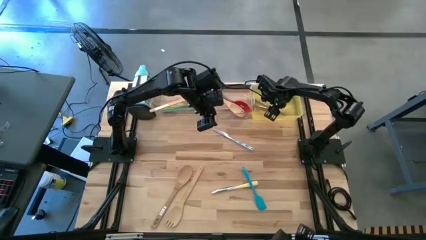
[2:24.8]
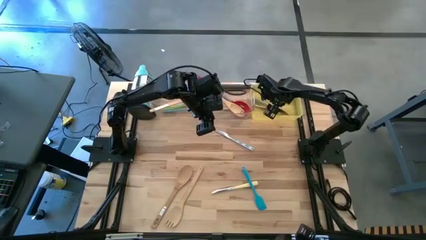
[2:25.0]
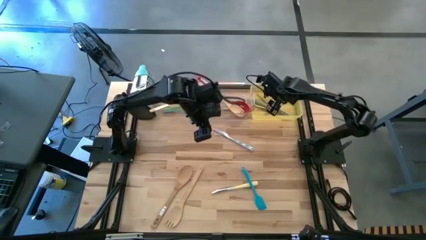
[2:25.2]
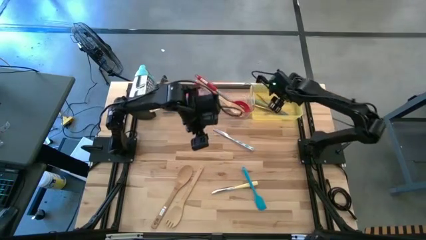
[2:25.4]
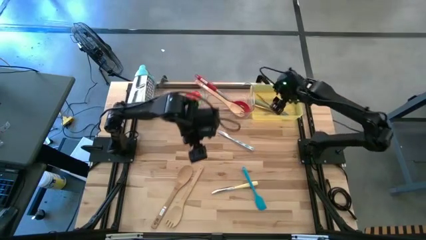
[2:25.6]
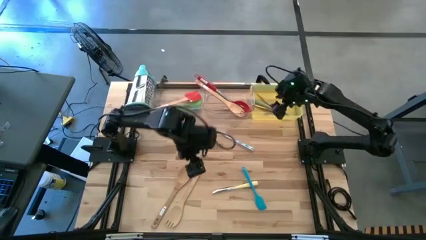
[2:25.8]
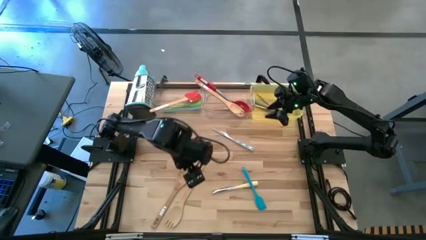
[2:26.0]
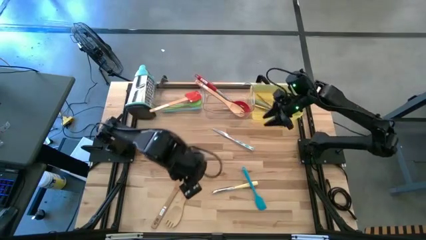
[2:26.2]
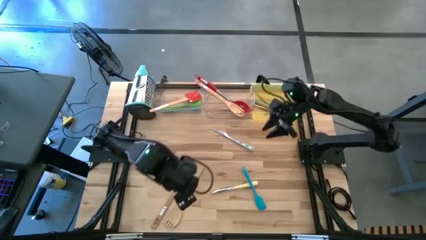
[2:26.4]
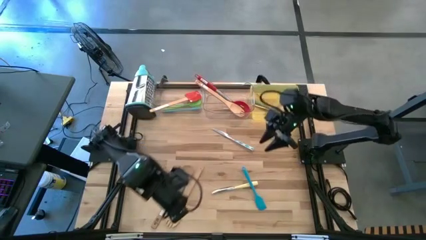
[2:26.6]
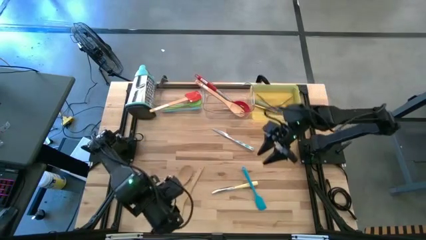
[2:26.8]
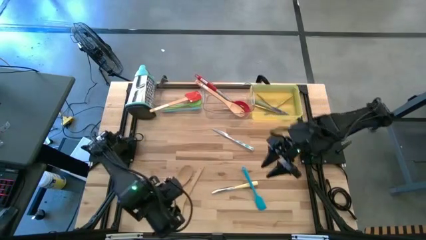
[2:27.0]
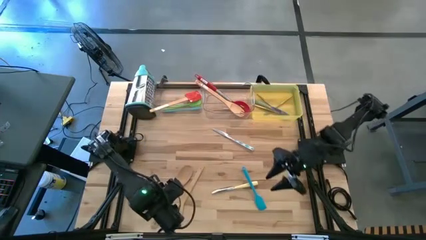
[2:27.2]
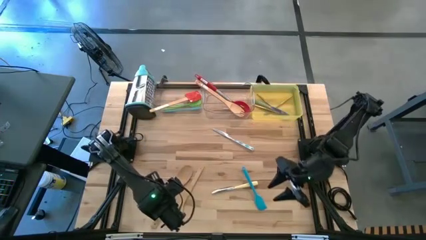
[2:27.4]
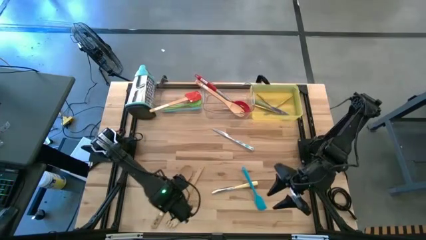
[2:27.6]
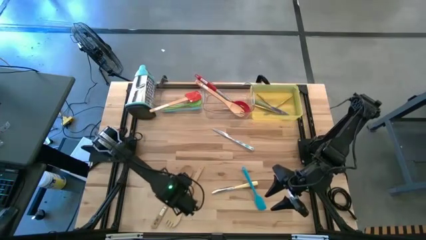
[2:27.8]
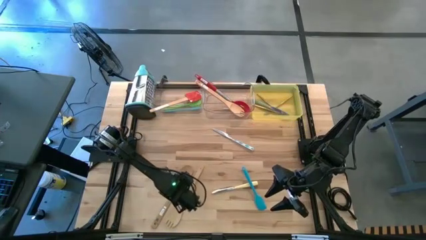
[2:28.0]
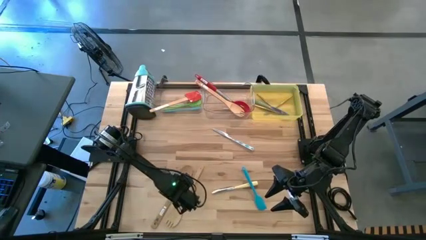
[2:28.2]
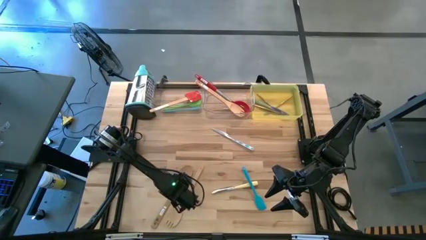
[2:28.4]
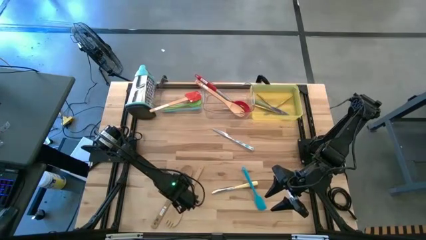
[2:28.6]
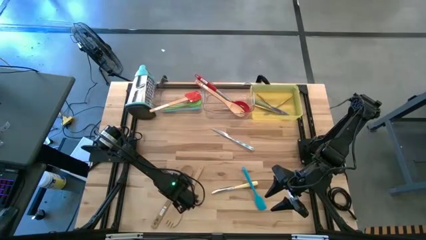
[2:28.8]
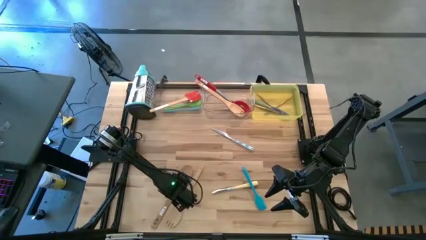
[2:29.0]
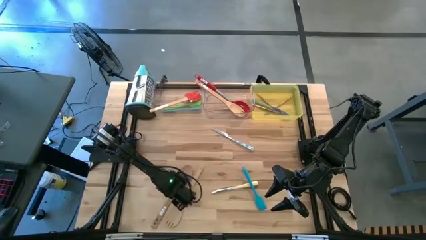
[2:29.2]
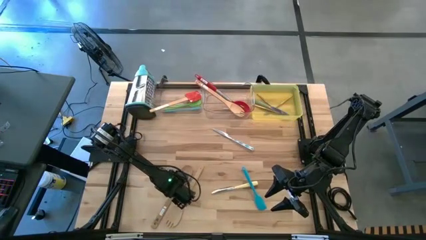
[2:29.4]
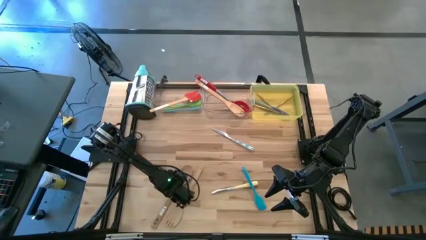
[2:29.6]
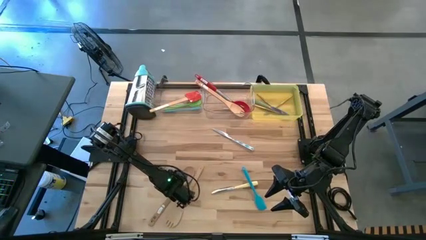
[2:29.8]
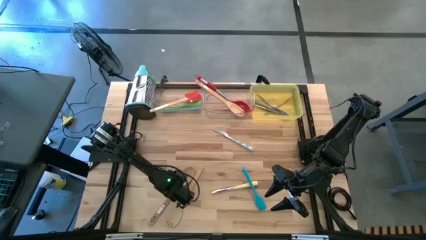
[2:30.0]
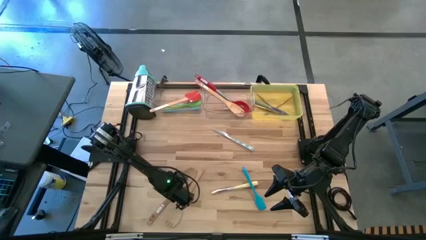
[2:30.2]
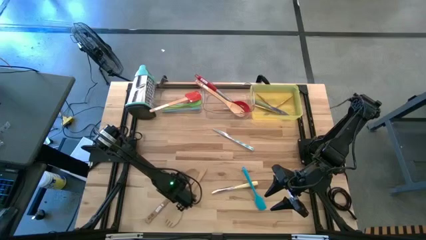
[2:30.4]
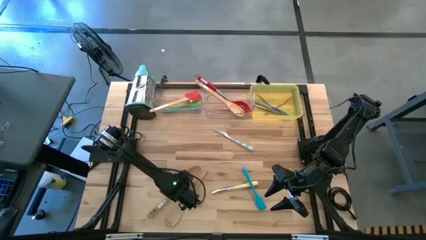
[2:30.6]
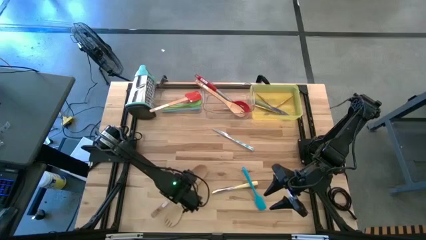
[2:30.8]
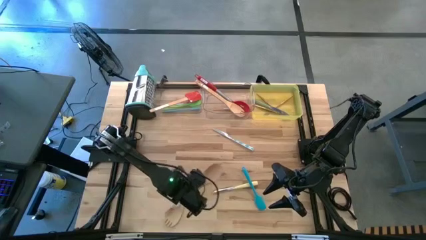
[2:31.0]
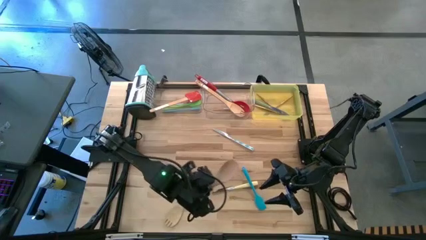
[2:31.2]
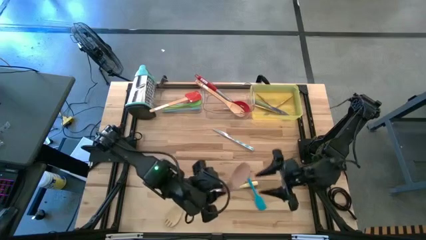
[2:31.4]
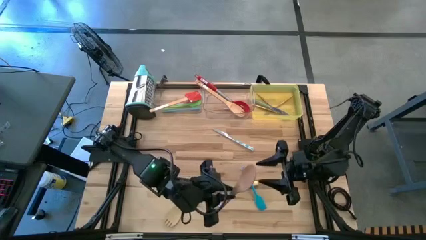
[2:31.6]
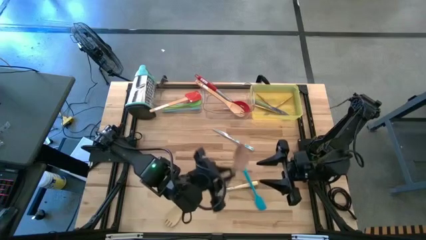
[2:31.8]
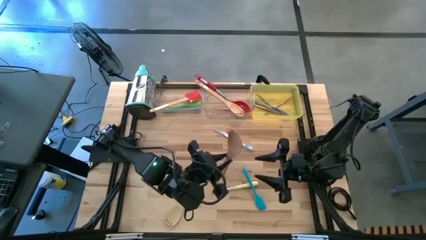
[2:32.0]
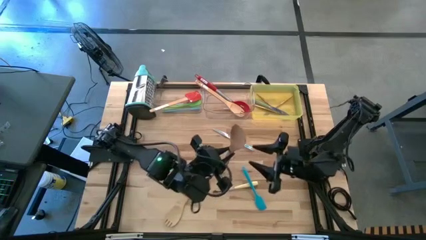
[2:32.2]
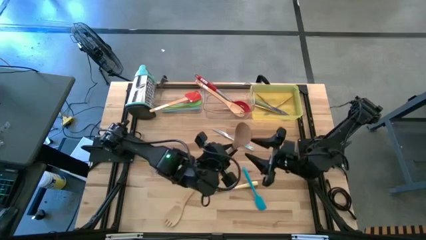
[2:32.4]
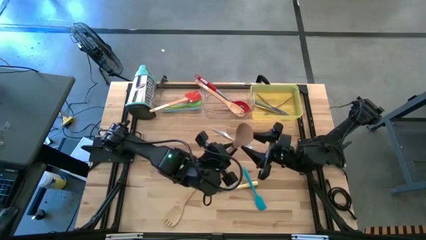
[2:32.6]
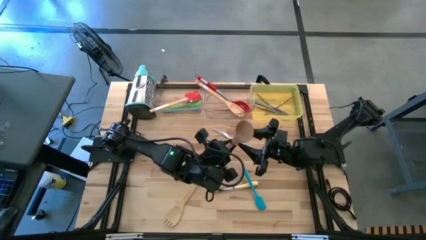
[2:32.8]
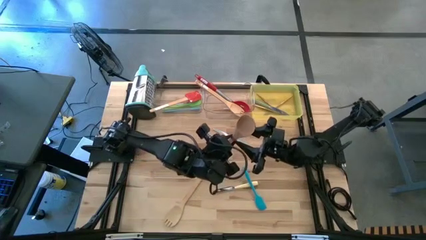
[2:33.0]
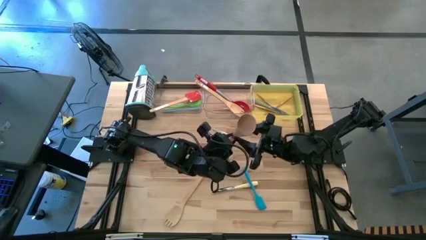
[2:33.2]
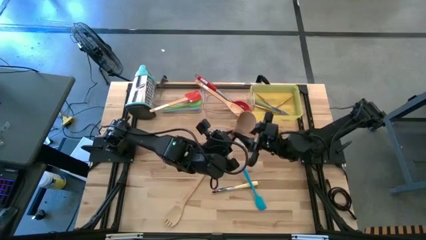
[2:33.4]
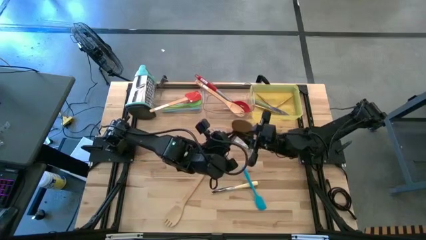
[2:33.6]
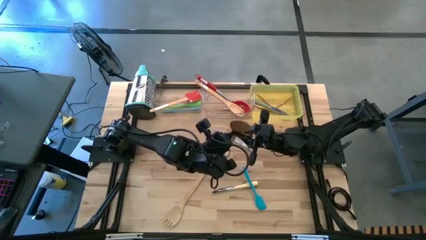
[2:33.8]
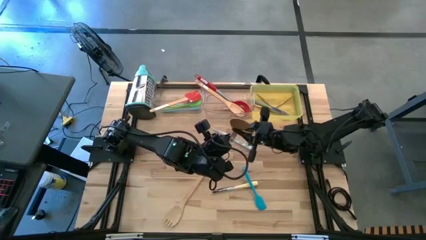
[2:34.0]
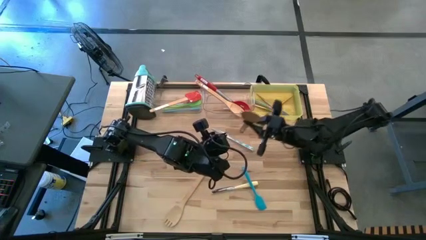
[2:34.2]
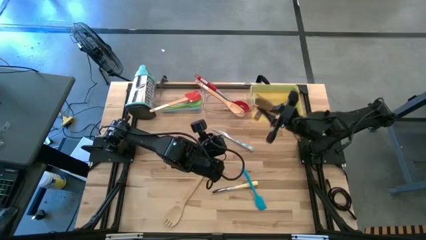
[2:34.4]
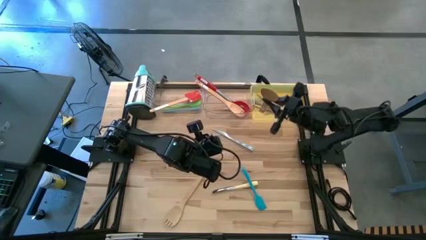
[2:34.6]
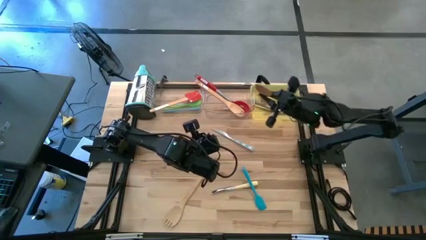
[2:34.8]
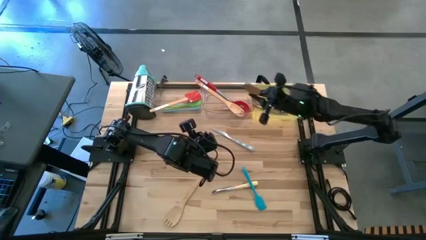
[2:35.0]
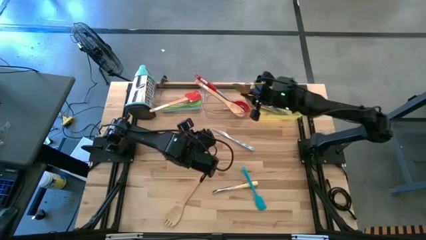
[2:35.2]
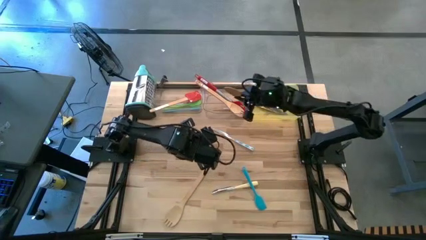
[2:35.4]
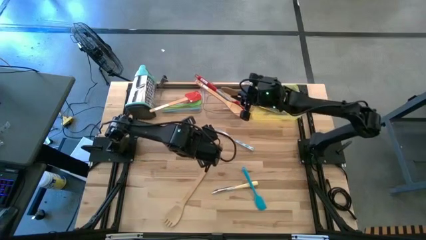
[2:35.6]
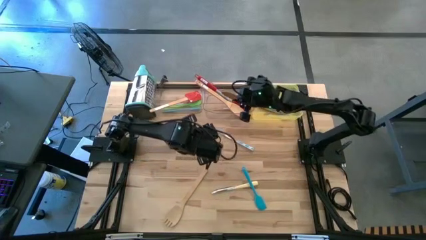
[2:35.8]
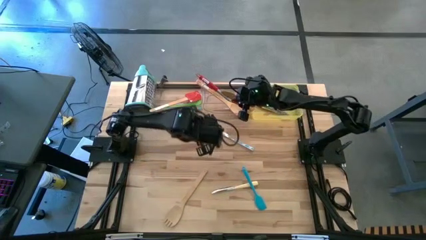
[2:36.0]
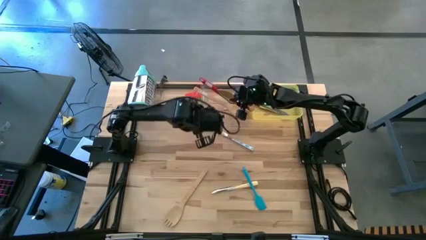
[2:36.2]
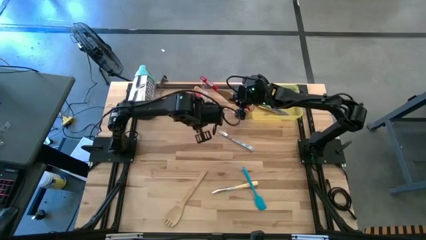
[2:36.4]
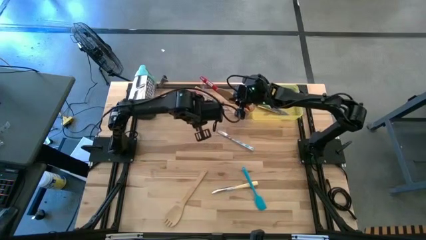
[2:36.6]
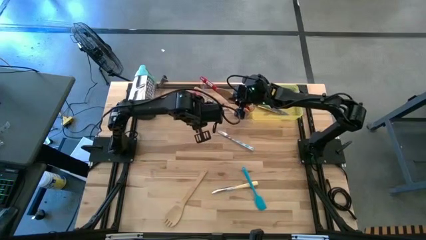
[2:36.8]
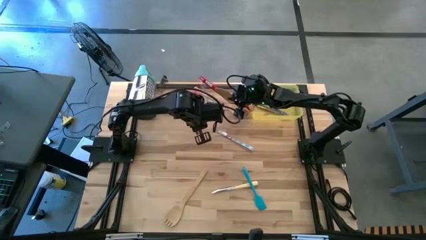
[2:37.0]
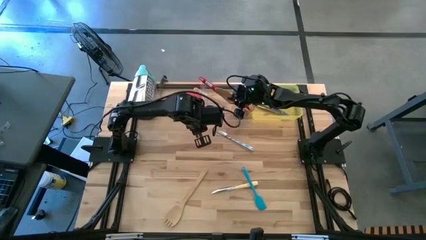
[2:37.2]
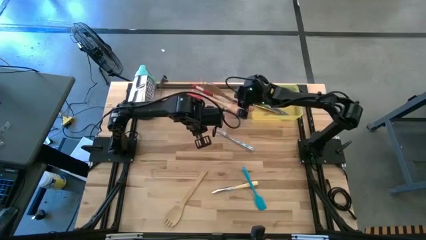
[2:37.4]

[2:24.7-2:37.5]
Task: Pick & Place Kitchen Items
Put the brown serving spoon into the right transparent bin

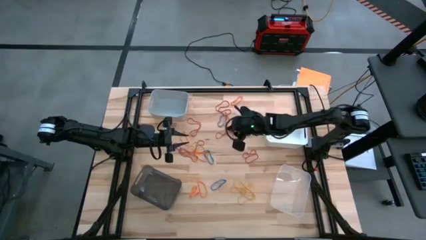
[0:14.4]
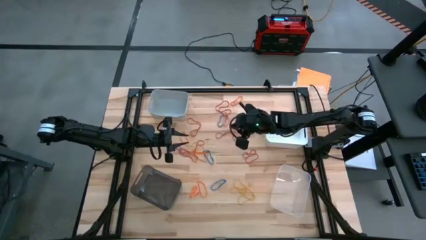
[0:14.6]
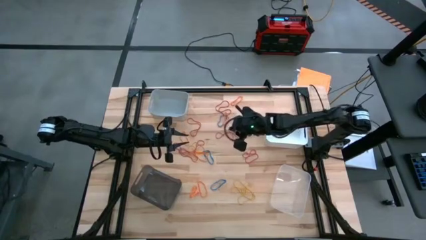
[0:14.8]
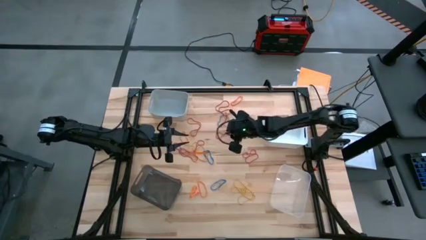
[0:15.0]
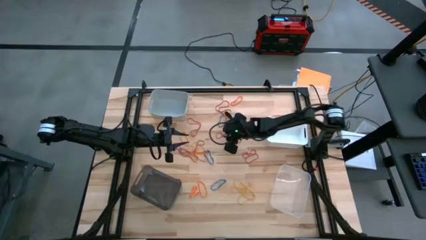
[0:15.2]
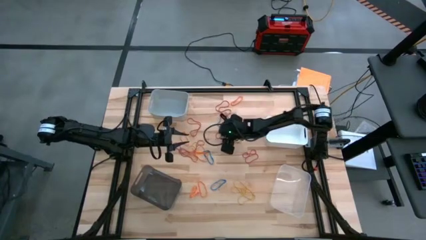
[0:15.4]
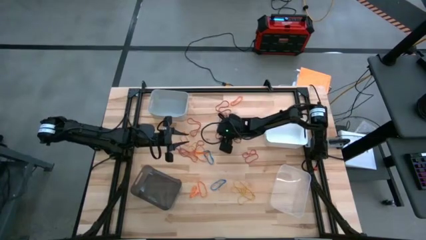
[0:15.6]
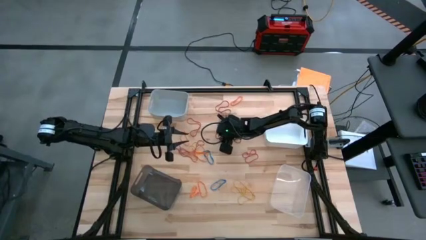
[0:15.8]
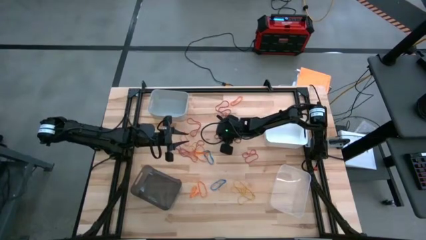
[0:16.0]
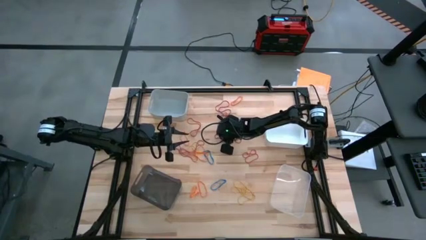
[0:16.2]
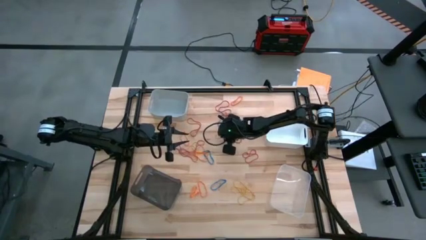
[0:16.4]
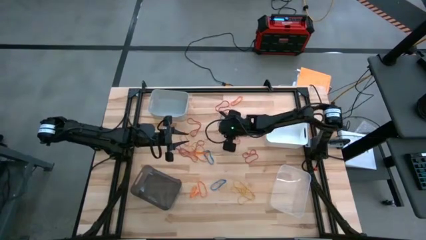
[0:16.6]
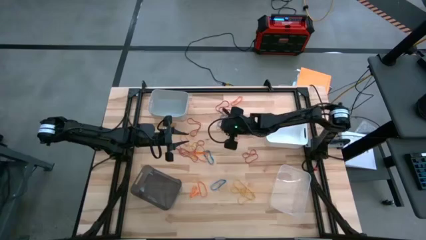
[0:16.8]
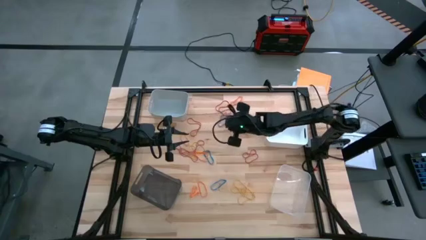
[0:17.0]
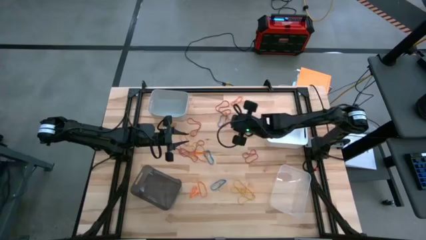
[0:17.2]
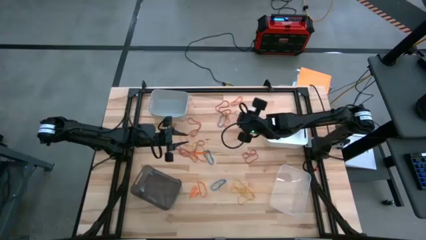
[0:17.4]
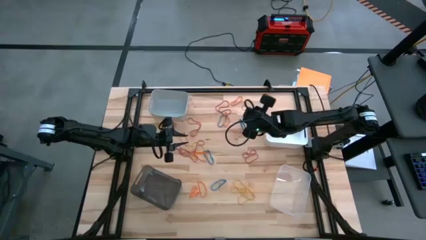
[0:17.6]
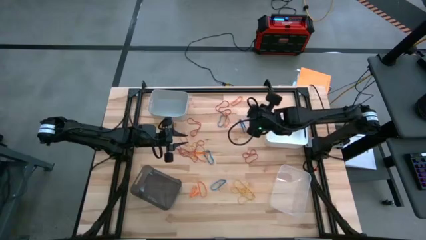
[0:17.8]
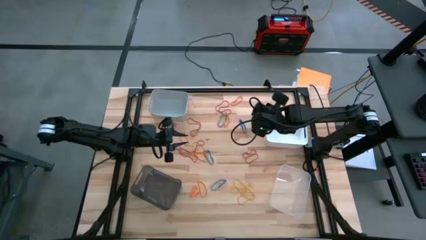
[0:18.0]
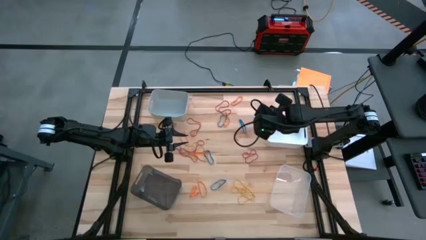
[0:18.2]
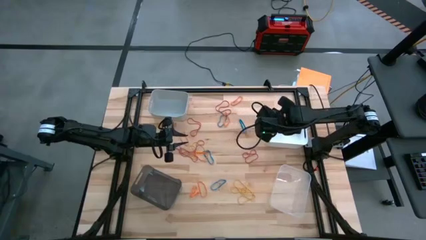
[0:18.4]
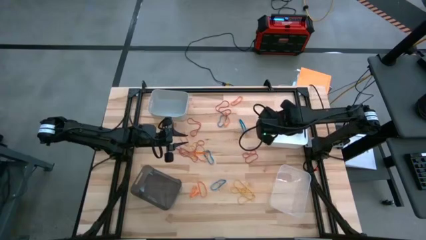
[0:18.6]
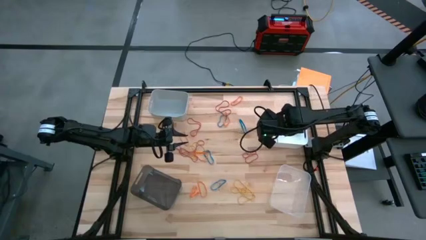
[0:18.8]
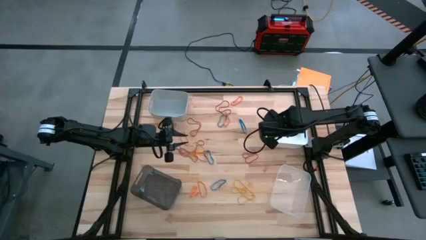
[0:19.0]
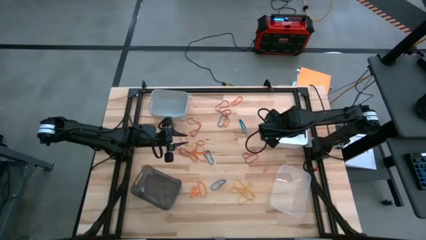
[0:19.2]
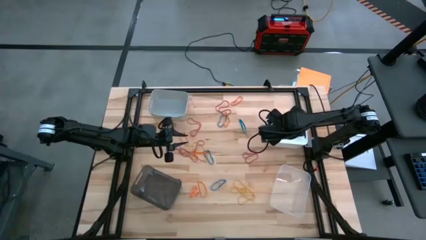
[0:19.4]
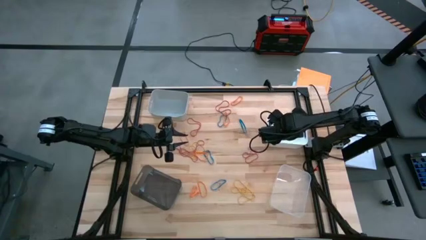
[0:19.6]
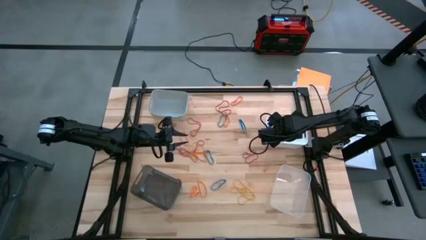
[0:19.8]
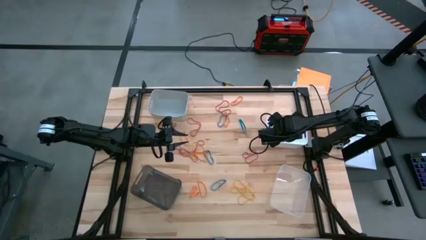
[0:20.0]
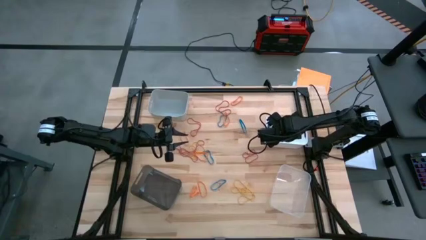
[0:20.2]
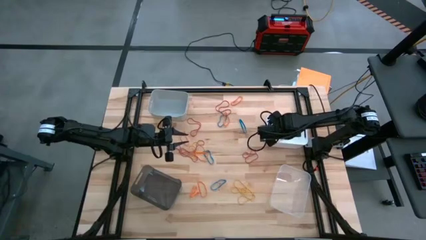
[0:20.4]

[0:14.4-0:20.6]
Task: Sort rubber bands into baskets
Put the red rubber band into the white bin
